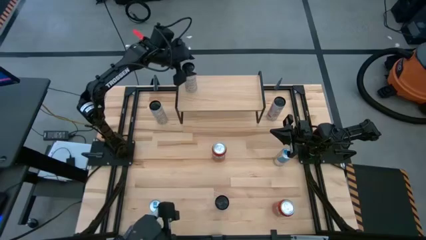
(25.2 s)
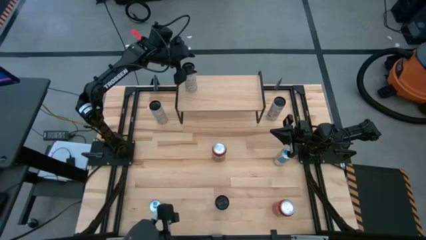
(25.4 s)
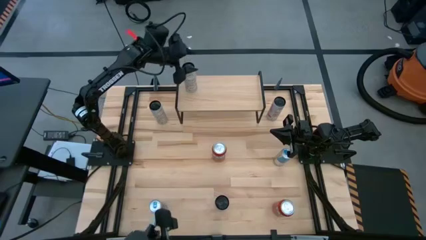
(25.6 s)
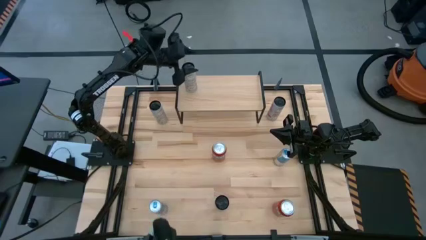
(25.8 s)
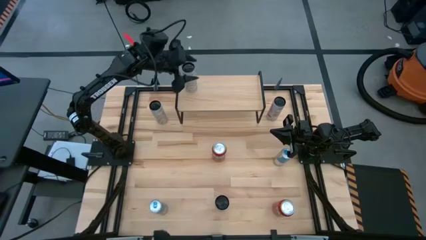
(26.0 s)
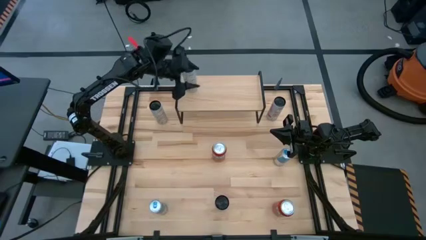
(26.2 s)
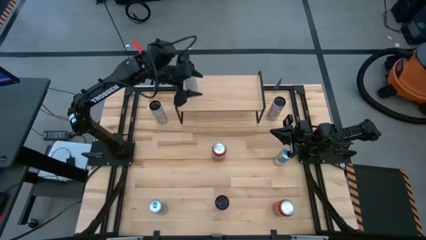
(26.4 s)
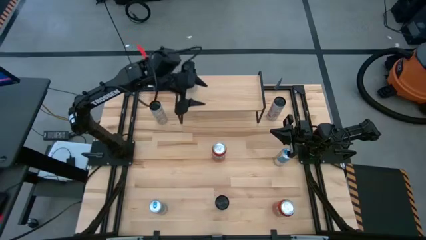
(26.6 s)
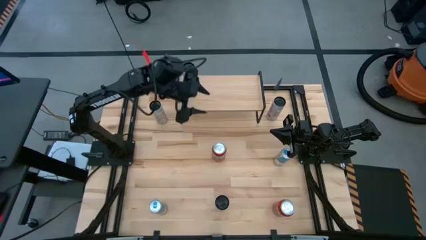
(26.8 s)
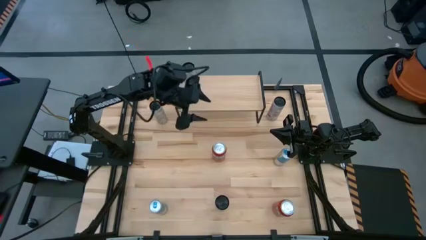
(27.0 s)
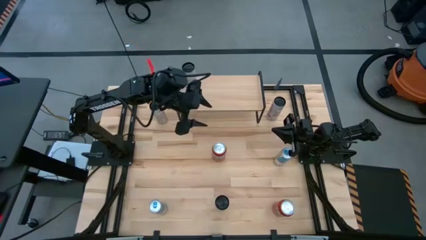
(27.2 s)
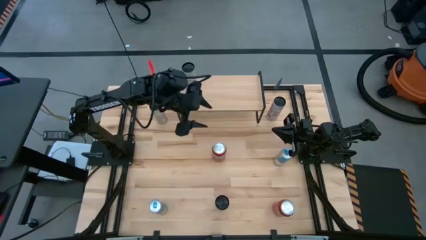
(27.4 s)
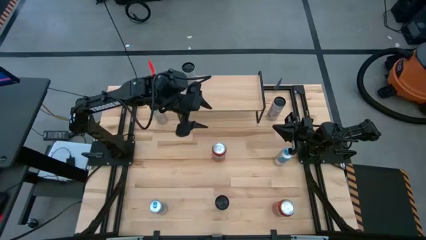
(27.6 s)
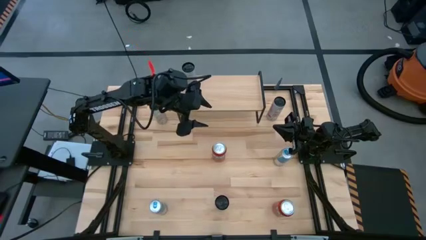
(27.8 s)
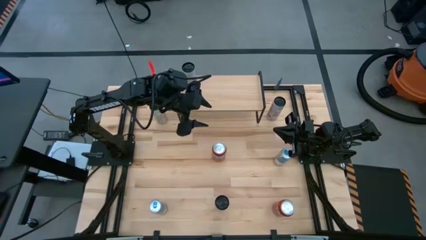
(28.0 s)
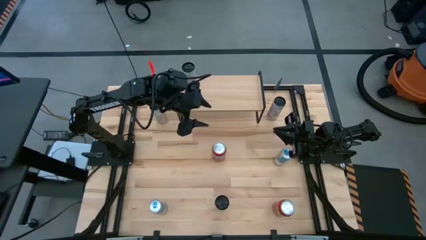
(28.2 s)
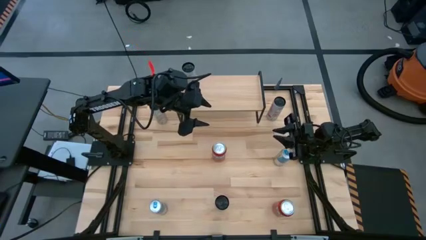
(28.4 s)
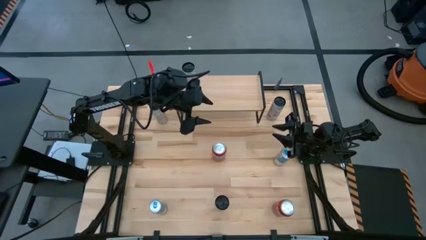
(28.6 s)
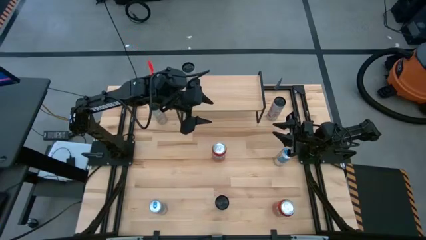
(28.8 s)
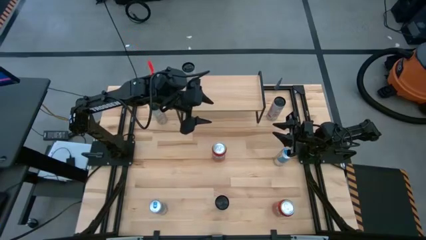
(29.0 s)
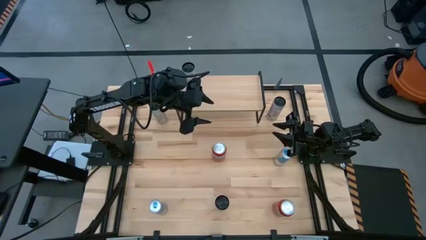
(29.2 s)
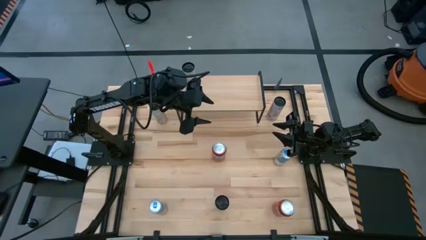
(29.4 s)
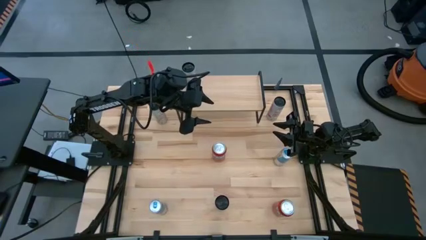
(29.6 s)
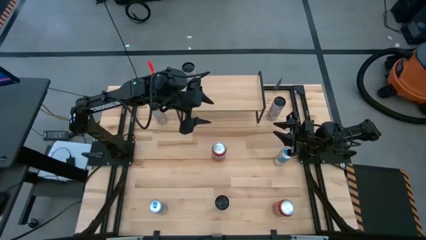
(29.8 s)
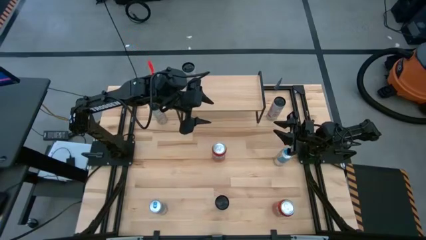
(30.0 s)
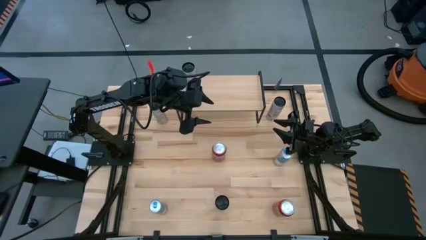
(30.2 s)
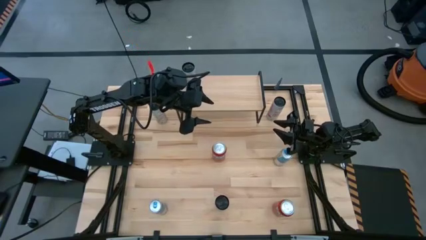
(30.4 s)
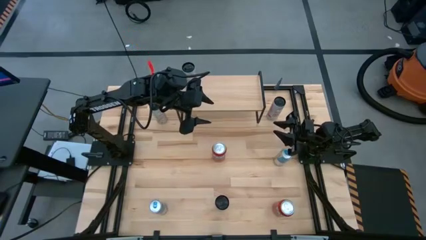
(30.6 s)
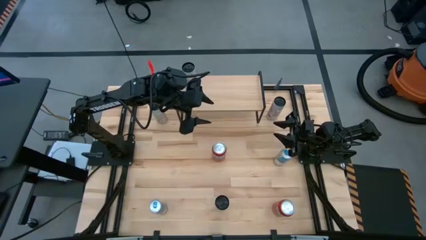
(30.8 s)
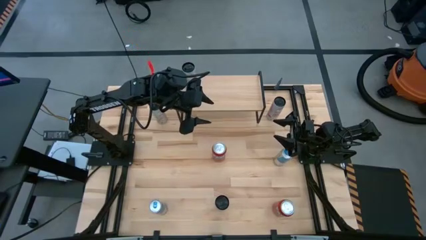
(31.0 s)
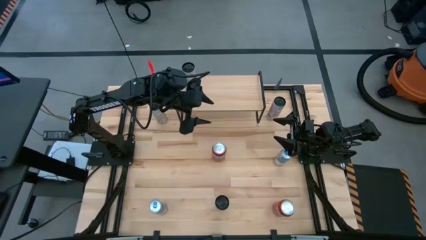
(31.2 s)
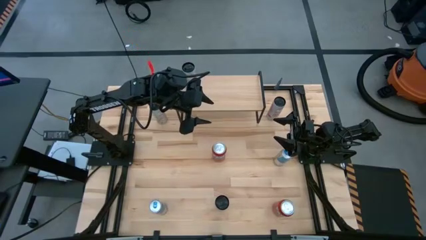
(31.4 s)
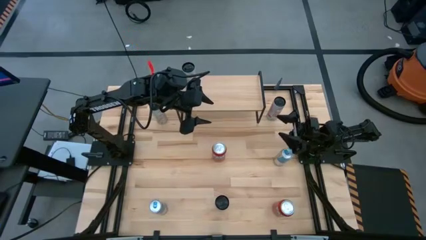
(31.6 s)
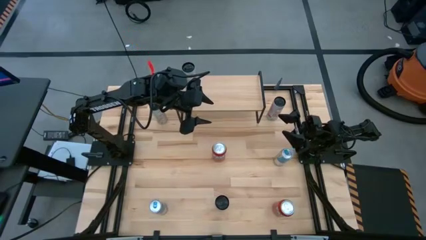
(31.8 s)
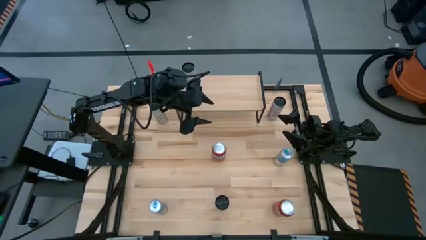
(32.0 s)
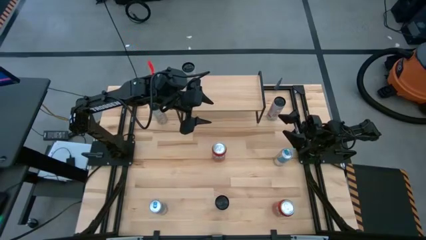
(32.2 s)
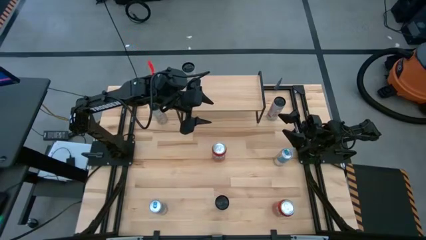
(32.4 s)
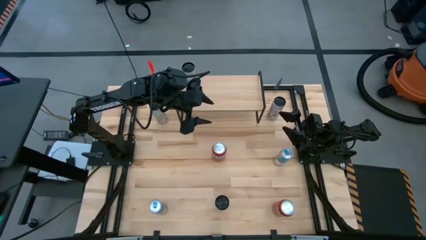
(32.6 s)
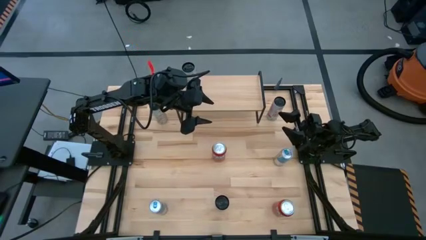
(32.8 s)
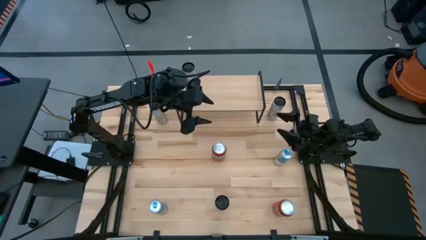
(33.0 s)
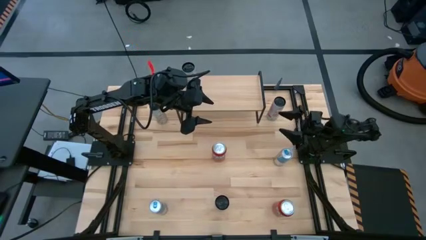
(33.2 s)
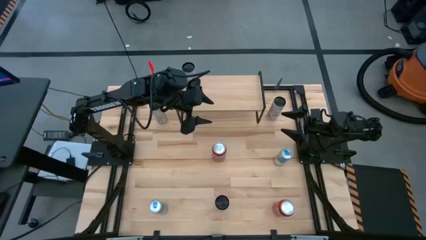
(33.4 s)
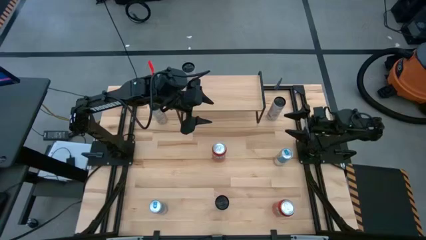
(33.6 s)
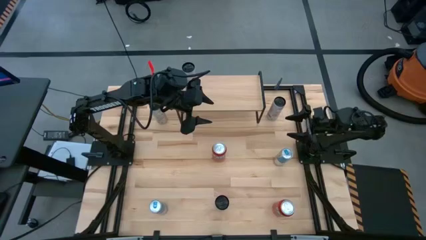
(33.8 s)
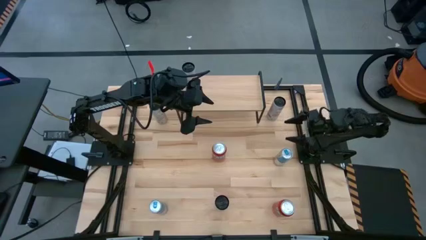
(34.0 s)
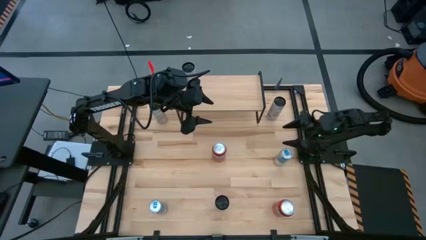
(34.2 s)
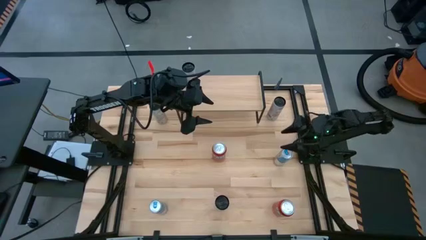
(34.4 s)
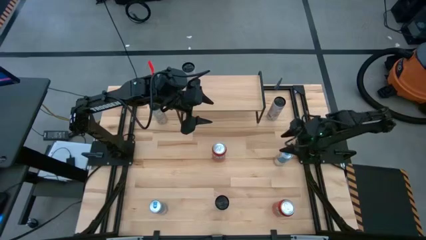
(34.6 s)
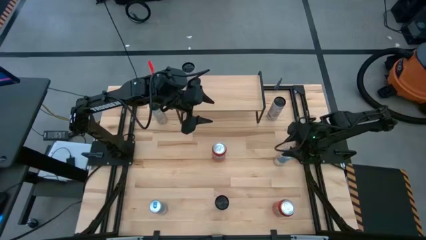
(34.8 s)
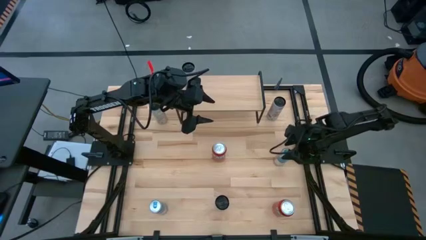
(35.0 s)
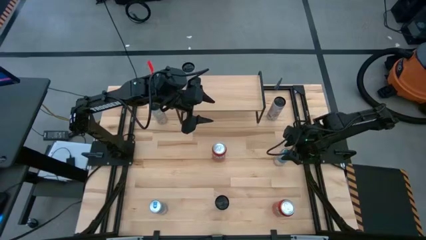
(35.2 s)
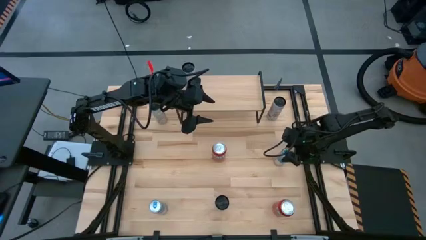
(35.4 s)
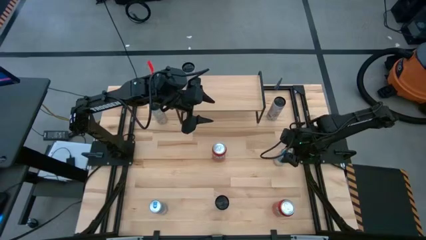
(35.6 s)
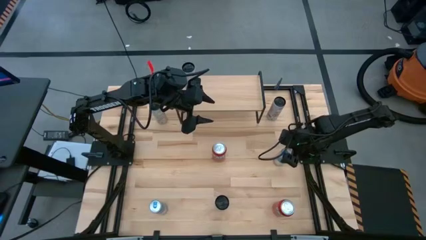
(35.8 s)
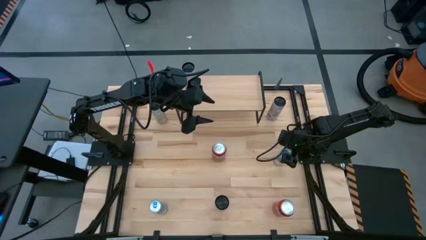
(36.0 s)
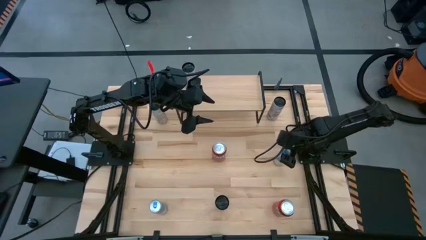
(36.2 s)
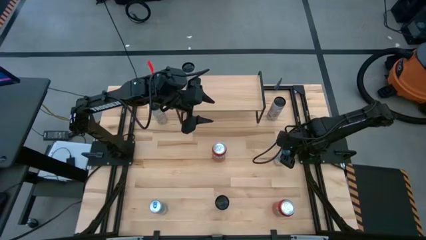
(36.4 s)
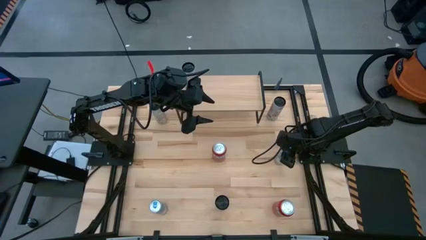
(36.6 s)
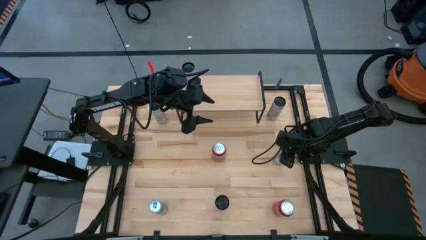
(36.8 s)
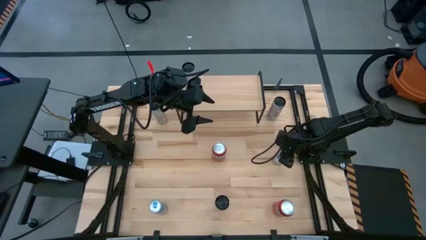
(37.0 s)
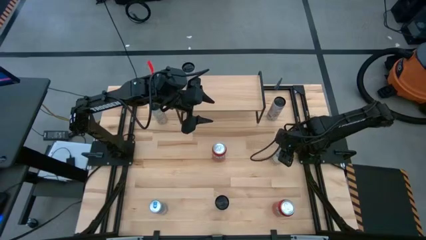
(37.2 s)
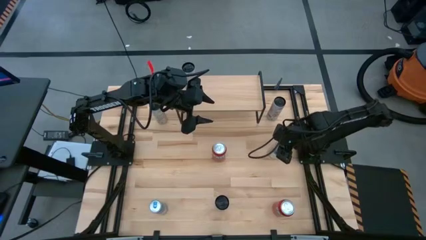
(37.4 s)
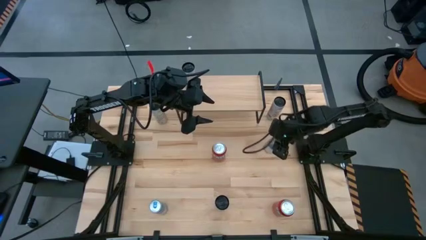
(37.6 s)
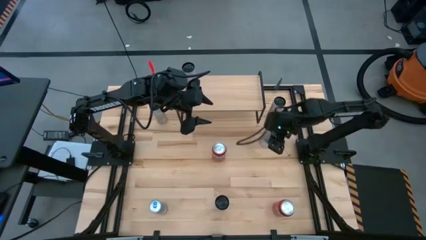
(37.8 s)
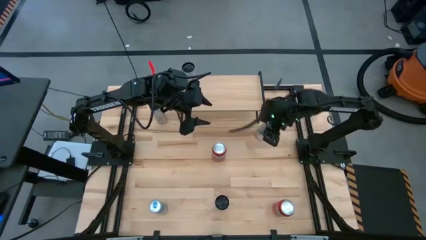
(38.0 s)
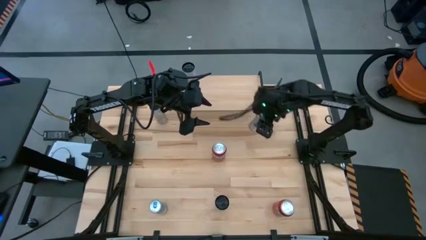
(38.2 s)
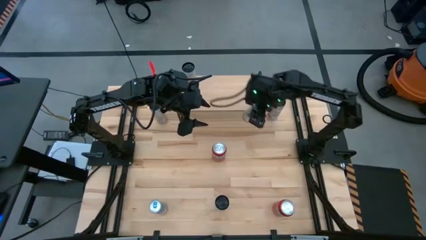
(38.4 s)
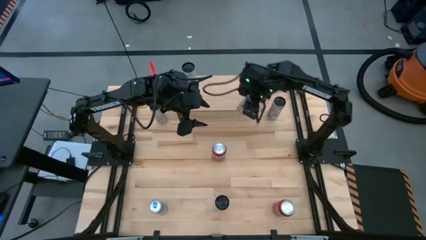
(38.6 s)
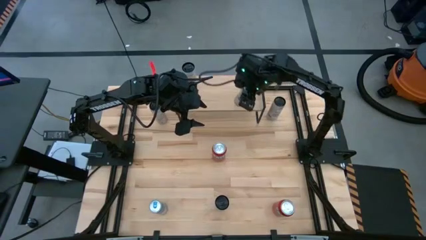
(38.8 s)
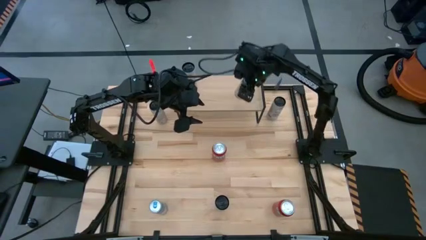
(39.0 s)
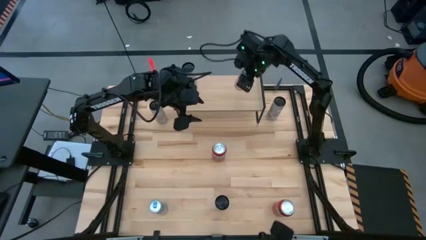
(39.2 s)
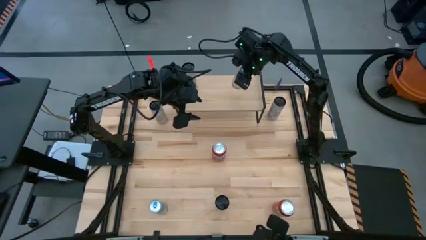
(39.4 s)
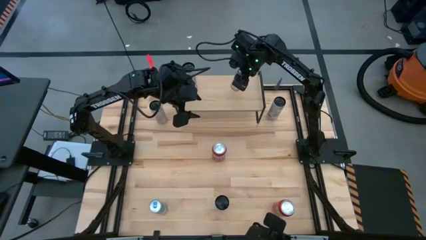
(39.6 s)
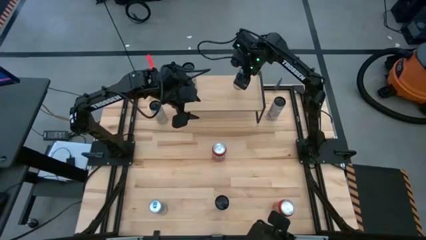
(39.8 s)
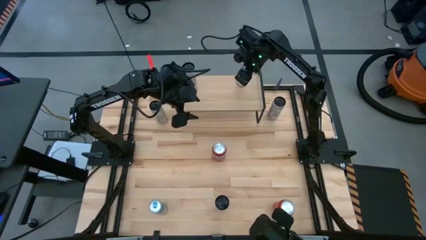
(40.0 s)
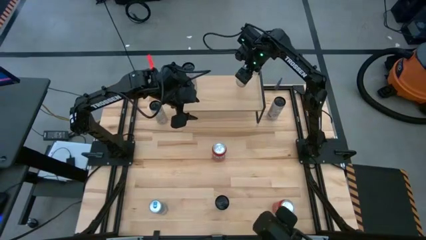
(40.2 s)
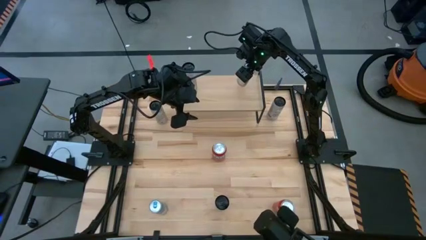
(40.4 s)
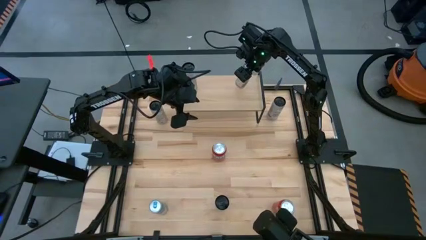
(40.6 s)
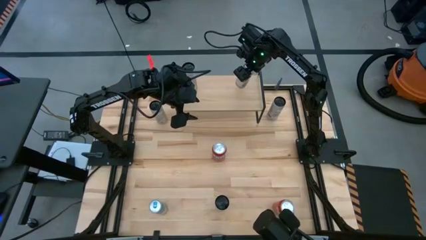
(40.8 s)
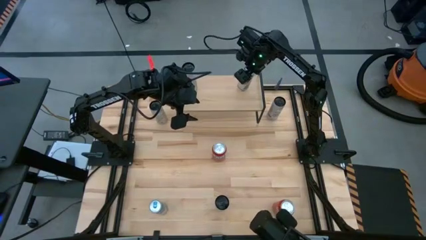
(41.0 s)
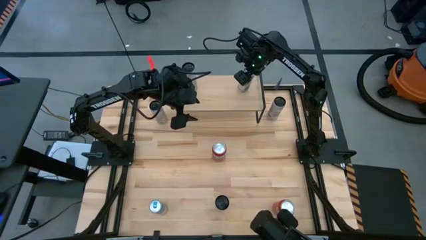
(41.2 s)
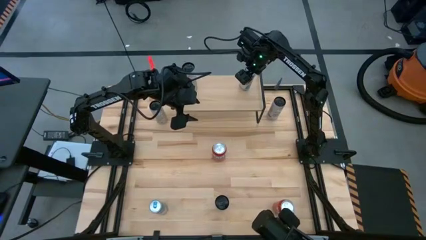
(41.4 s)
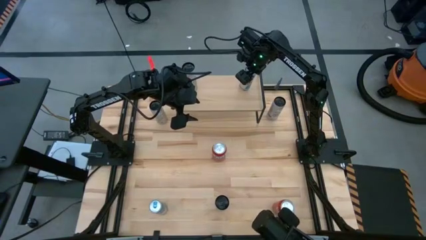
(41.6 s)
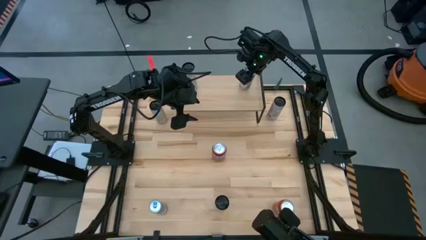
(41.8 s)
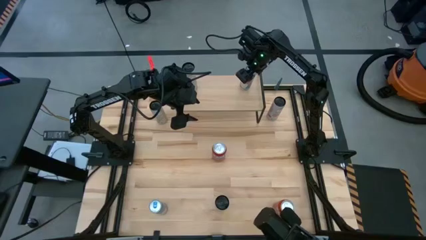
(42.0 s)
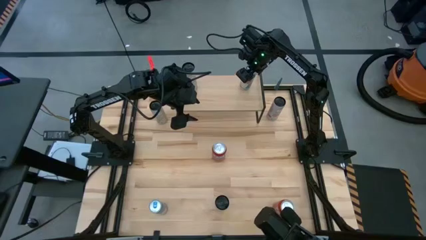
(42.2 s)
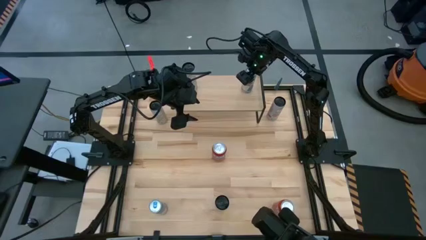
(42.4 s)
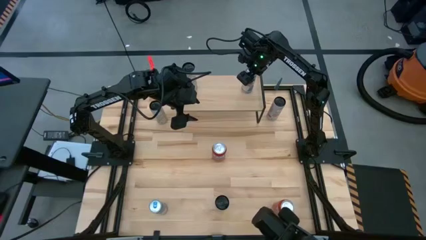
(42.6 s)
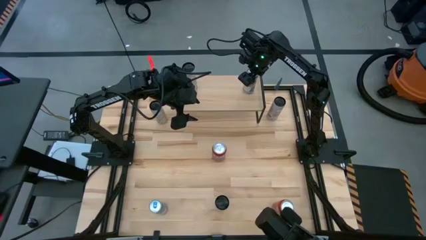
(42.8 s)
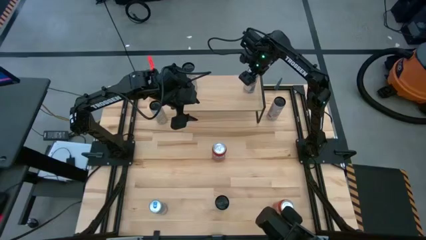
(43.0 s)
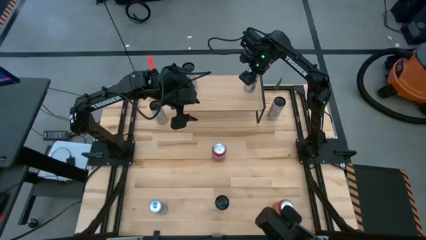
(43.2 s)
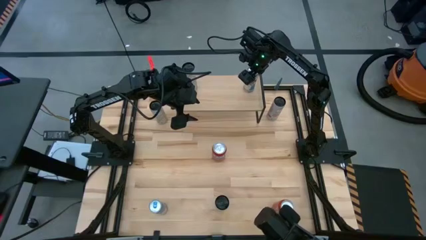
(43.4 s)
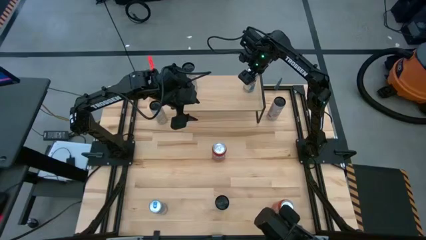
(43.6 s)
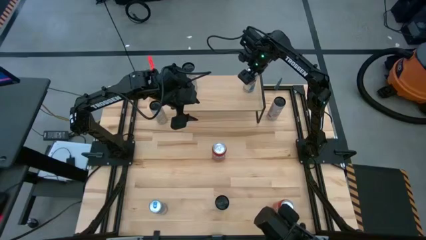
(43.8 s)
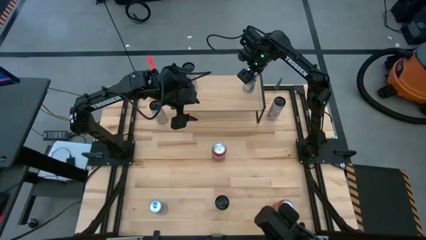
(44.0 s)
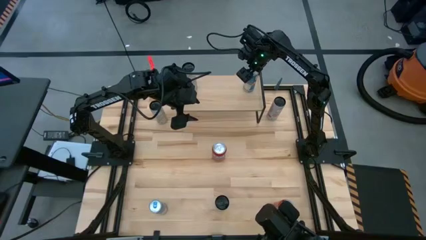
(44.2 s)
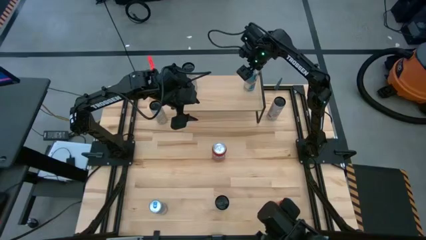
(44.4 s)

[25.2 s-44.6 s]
Task: Place canned beverage on shelf
Put the top blue soda can on the shelf
